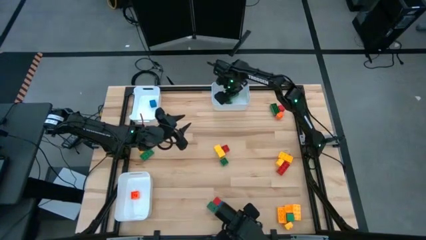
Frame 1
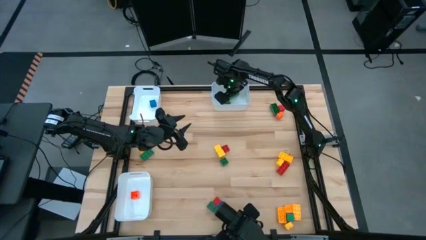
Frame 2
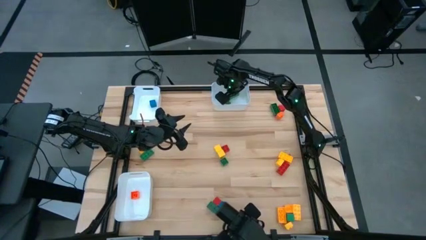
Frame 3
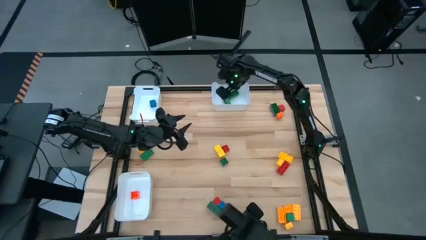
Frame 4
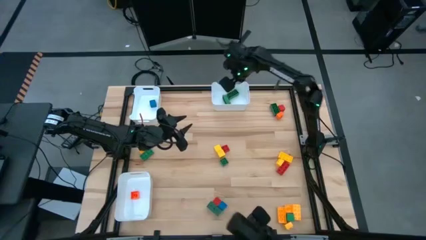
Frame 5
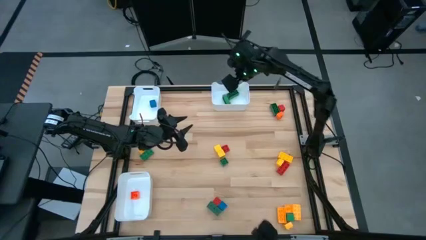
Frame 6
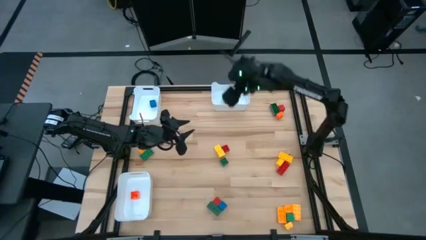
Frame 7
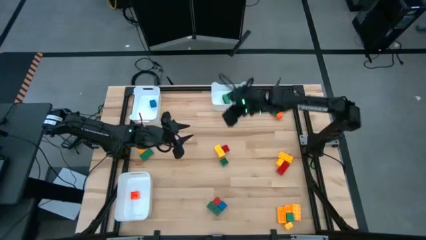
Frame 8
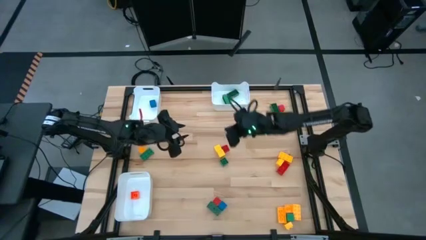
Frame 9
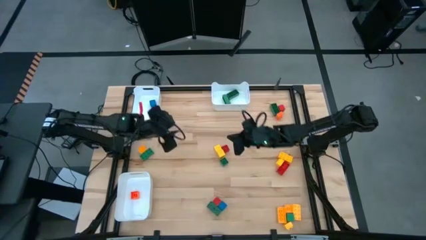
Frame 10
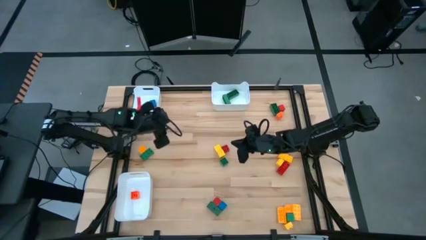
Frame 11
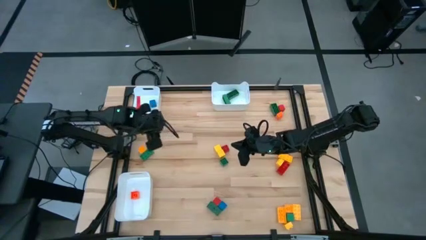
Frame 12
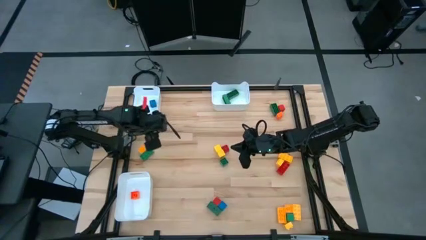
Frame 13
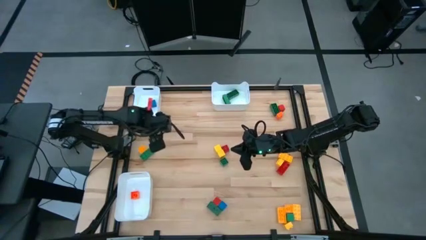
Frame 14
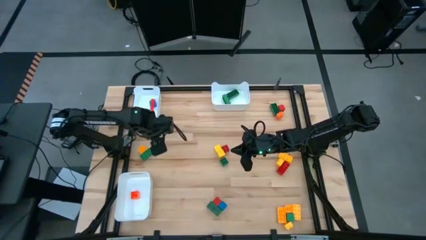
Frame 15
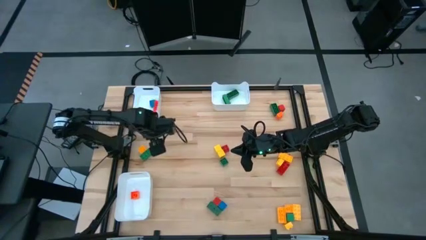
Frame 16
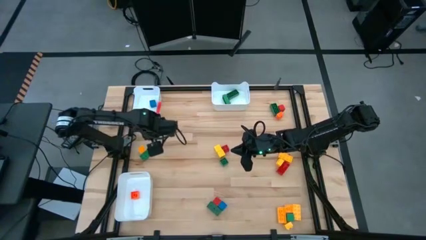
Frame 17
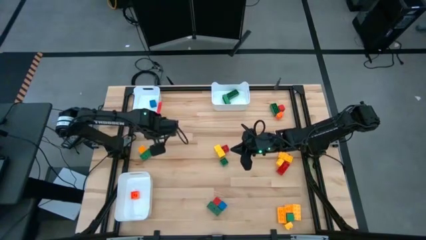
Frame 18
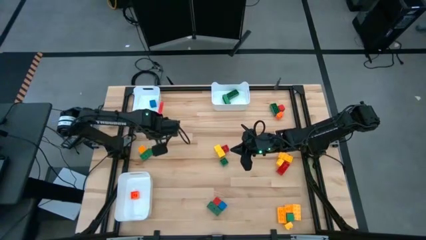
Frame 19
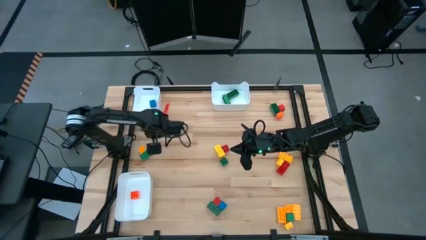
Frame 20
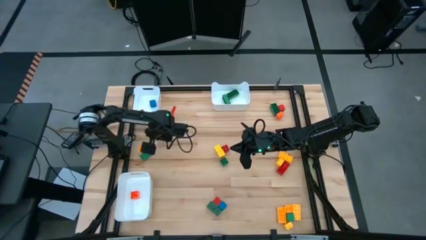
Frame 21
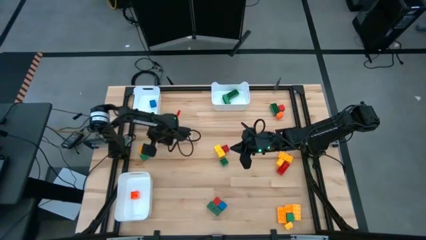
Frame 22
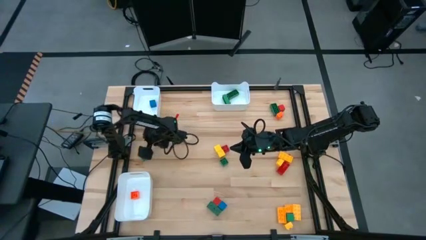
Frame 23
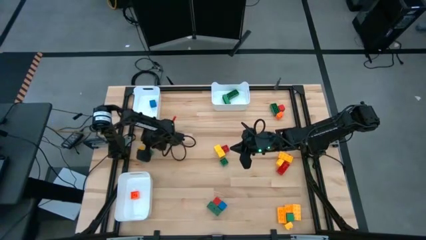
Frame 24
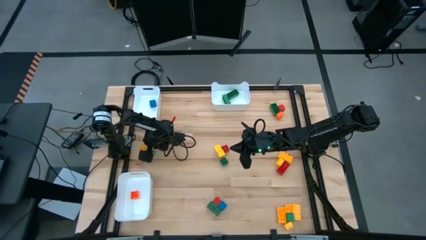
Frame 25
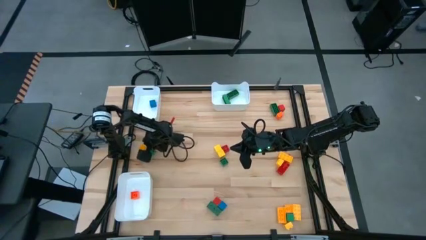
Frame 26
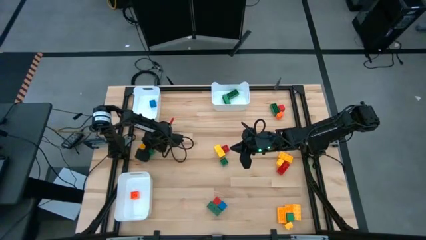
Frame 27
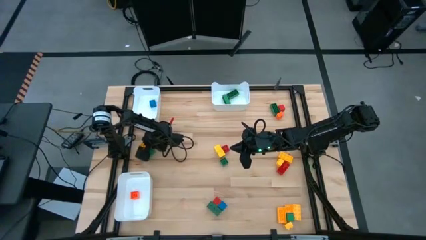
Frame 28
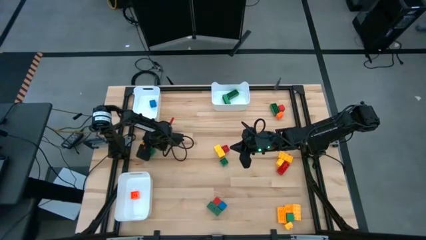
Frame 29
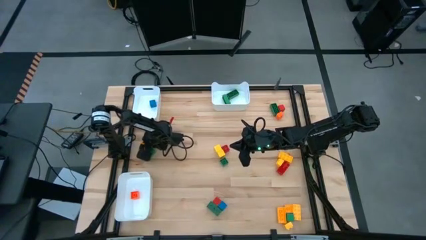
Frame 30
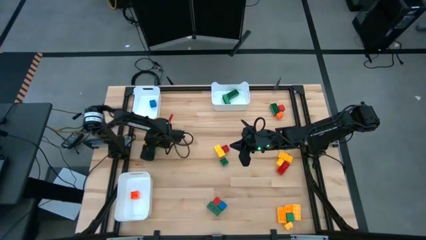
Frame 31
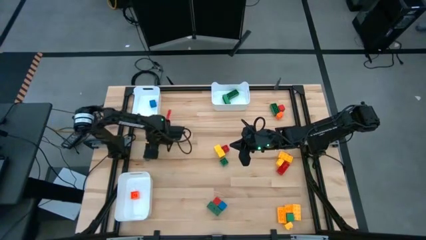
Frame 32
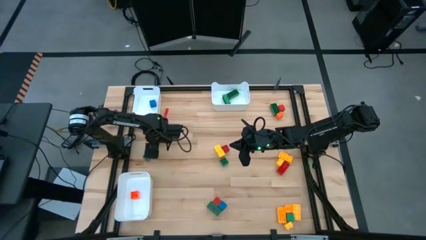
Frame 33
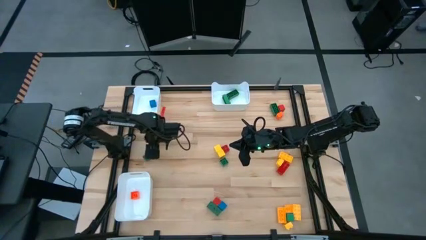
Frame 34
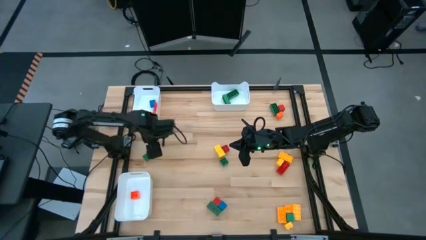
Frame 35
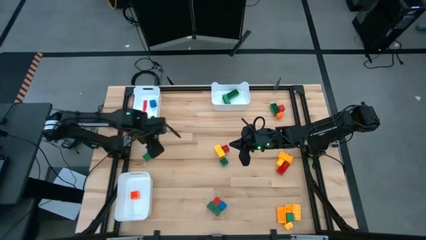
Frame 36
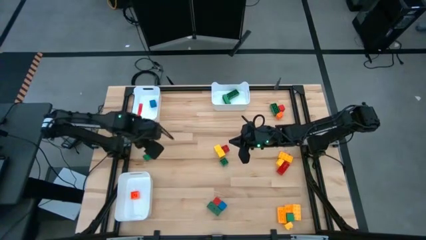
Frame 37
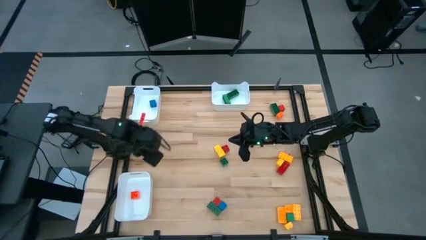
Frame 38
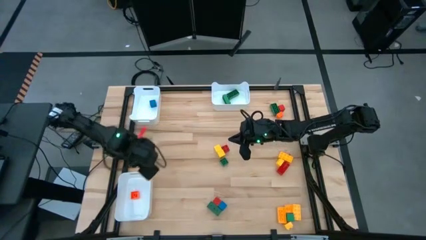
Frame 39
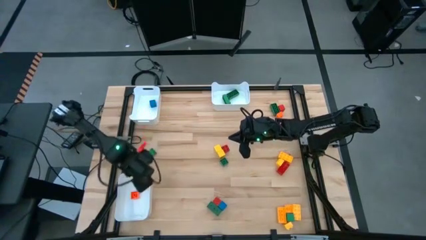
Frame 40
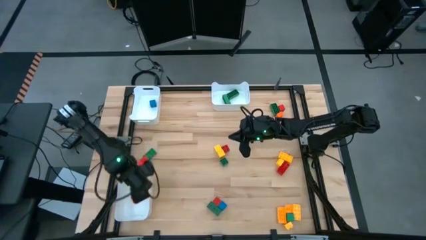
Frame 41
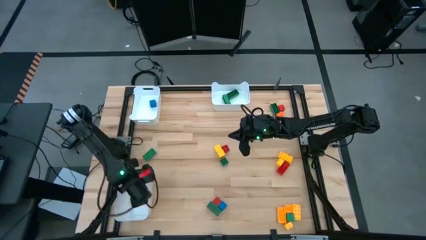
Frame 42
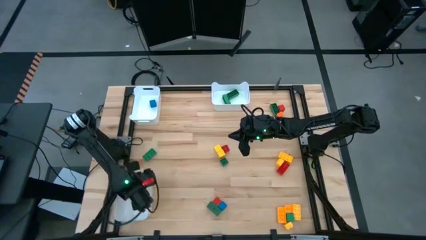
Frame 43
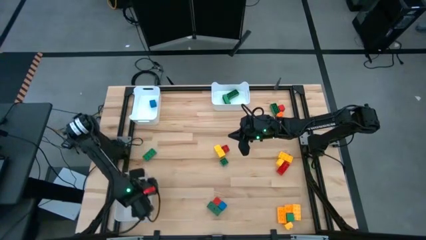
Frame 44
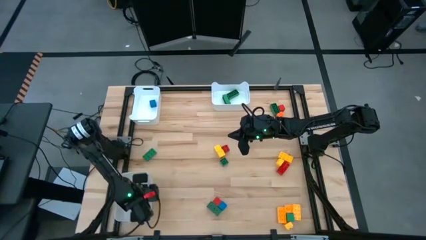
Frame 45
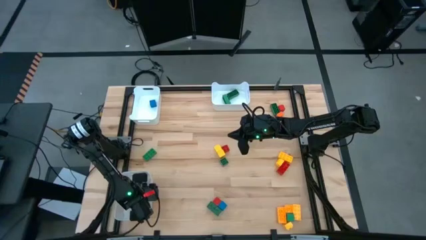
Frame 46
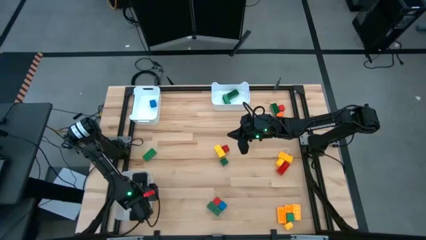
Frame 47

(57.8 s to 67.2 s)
Task: Sort blocks by size
Put the yellow 4 stud game piece into the bottom white bin

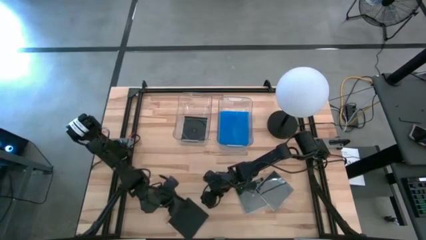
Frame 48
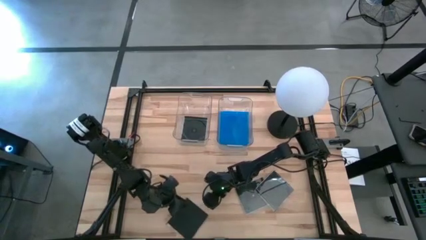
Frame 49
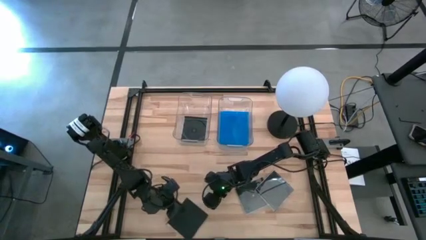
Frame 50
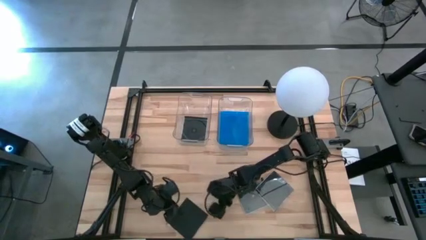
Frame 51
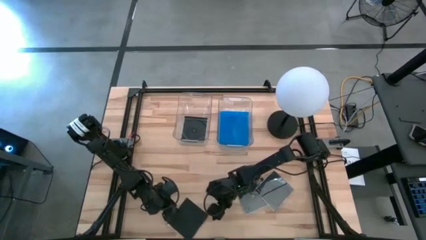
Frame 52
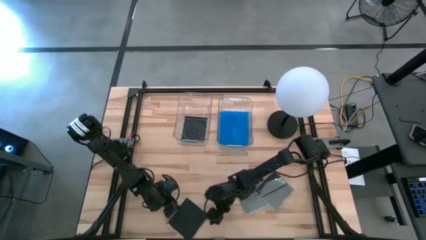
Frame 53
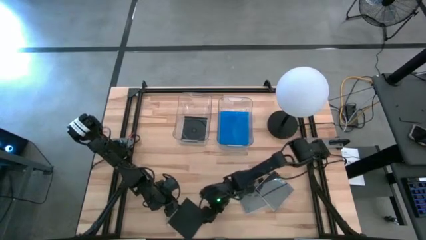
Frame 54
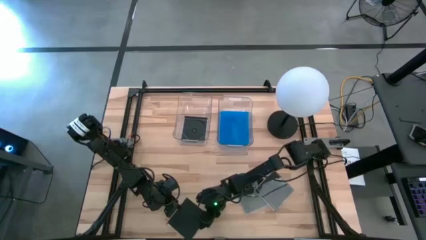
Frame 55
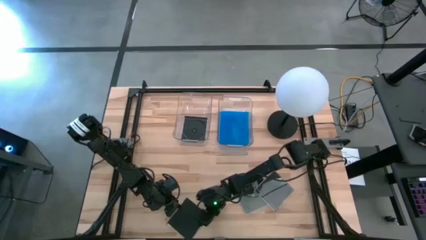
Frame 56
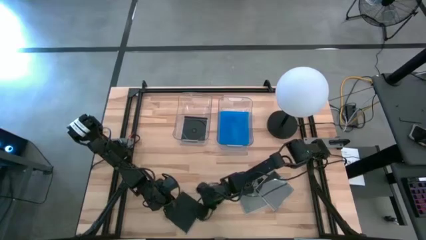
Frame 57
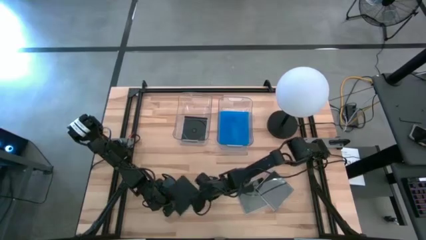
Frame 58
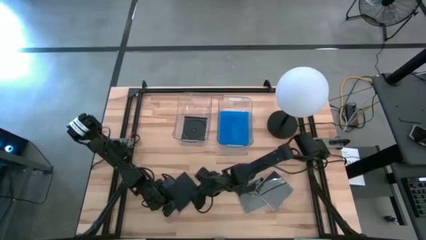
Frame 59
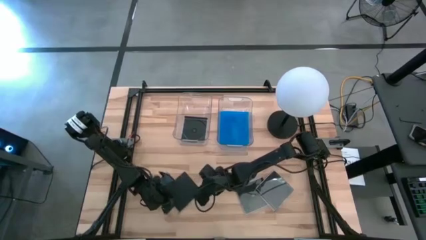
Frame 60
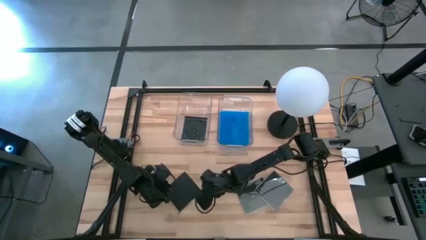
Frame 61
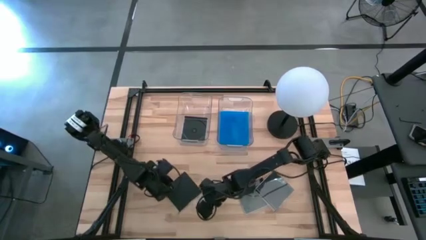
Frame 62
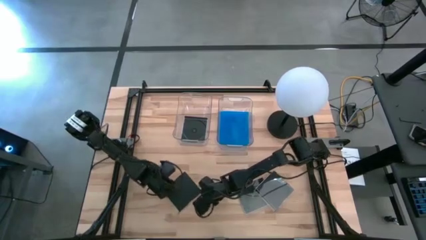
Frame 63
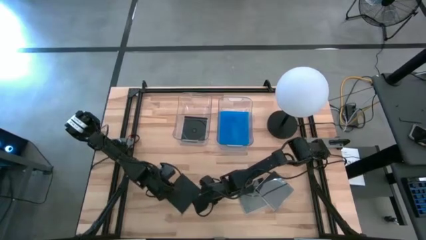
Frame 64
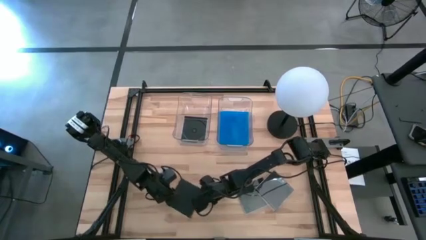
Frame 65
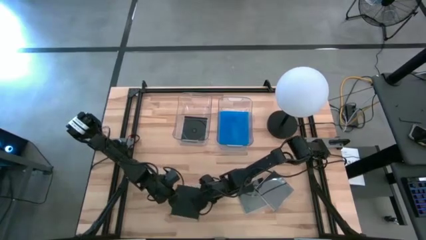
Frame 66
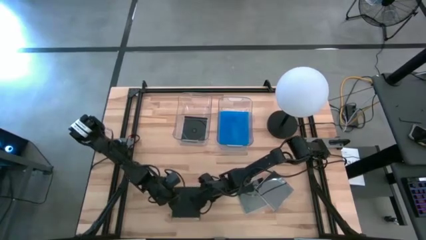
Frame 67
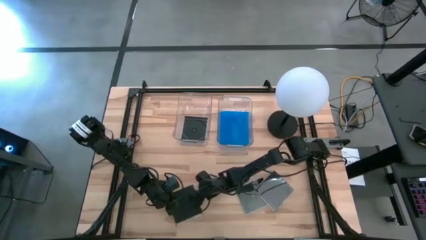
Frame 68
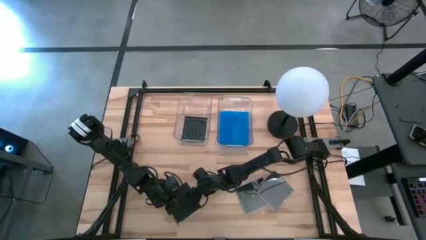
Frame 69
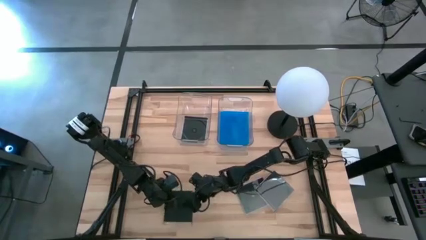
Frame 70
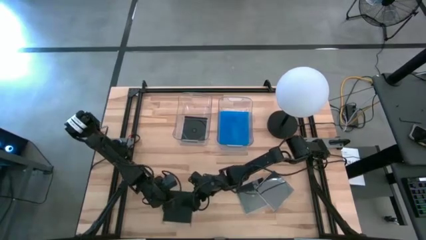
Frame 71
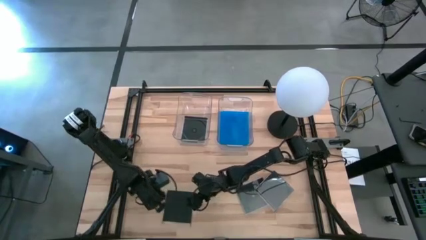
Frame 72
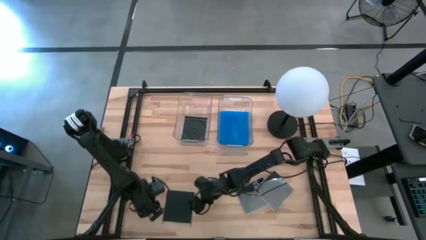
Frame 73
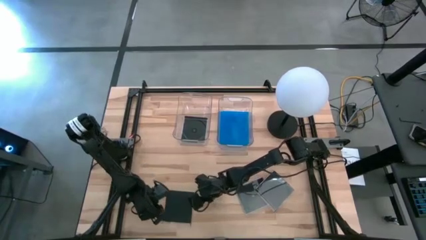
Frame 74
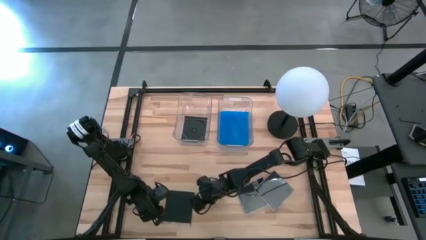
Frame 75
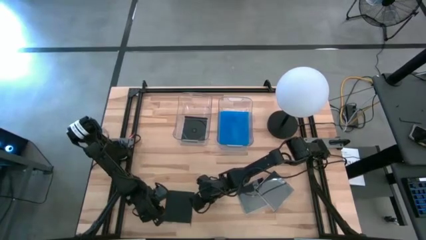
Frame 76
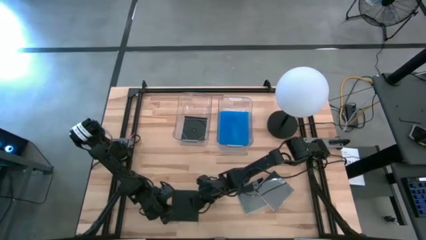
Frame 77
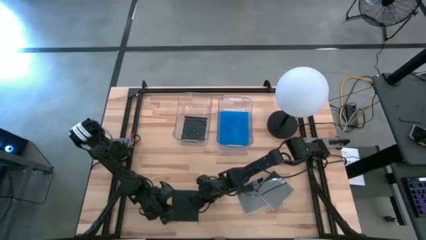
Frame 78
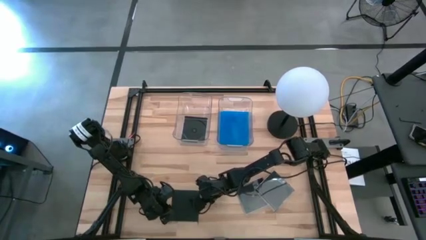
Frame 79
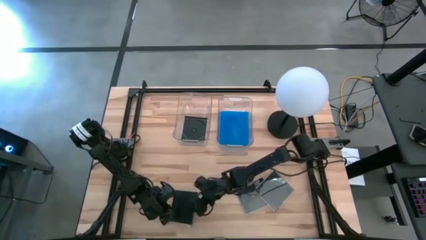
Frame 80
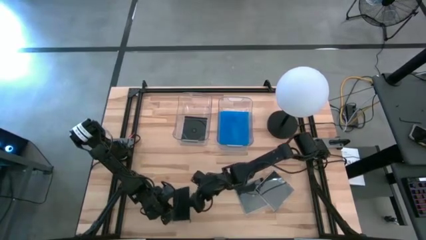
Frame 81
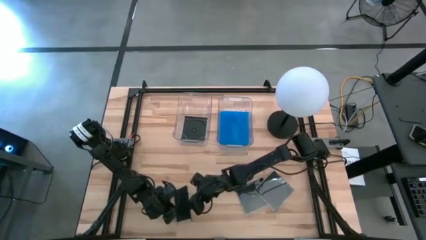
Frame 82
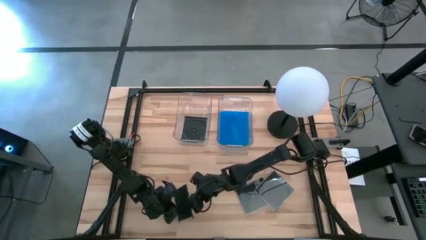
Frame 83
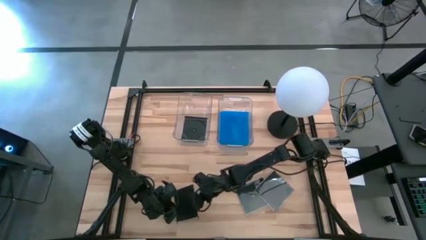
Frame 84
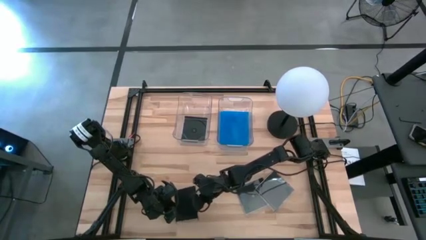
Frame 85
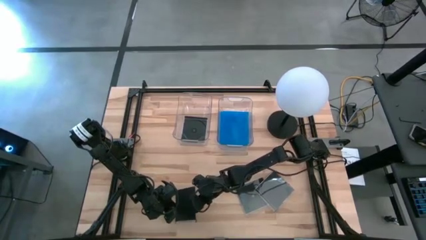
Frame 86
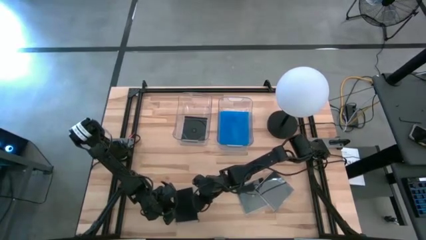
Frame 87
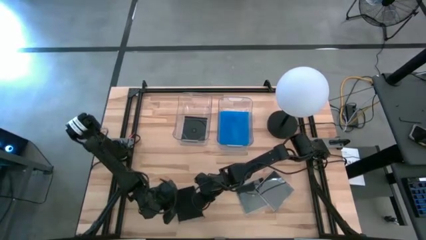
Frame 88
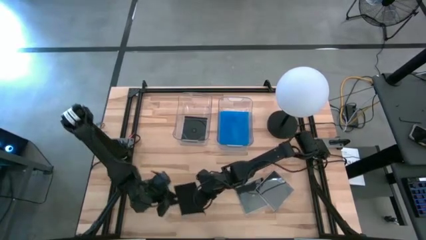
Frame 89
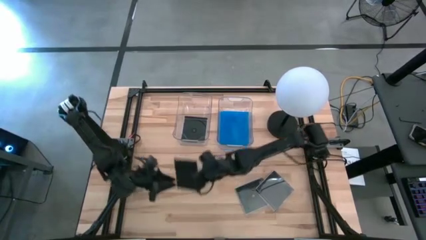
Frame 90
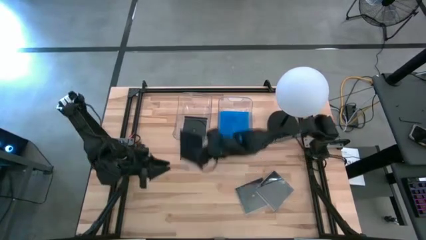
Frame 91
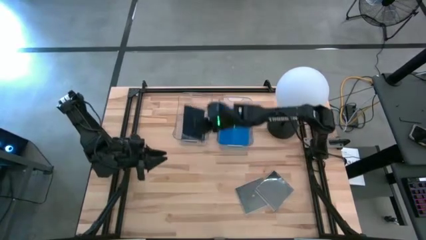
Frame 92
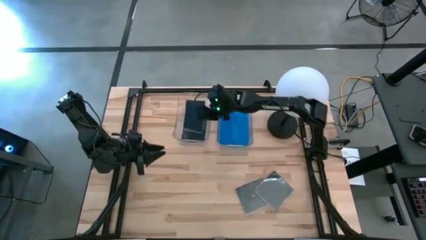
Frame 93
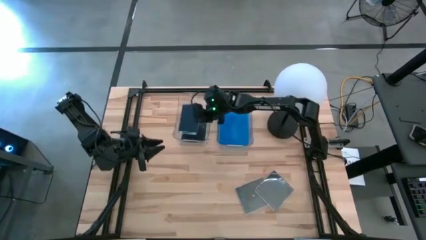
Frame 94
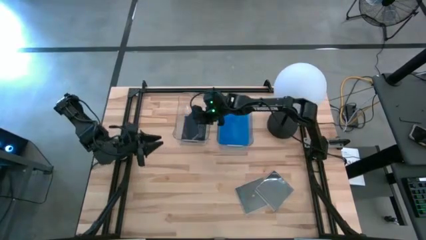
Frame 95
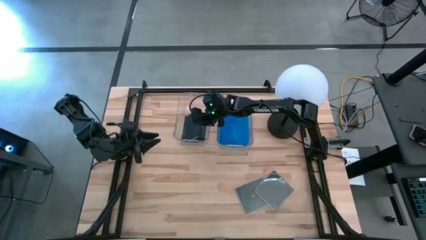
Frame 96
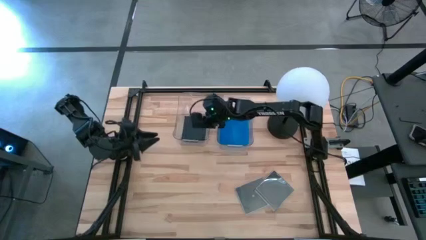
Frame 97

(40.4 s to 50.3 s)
Task: Pick & place jewel cases by type
Put the left black cd case into the left transparent bin
